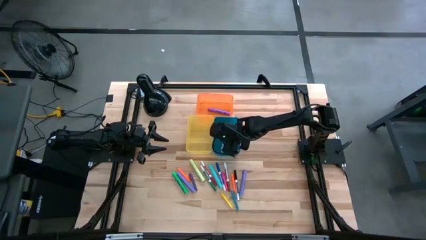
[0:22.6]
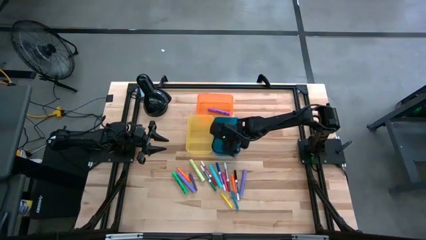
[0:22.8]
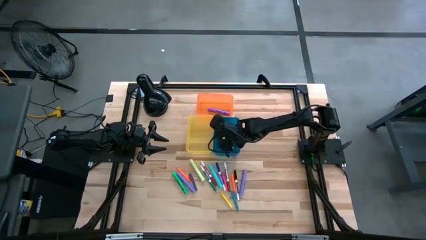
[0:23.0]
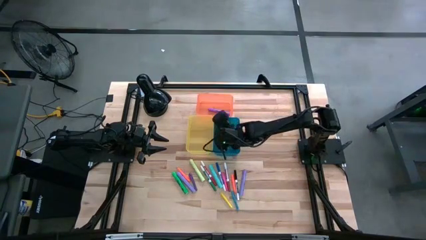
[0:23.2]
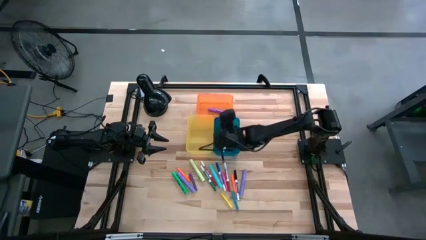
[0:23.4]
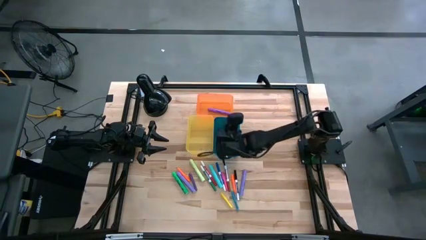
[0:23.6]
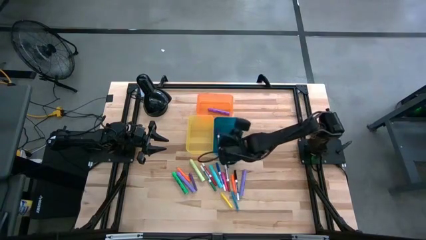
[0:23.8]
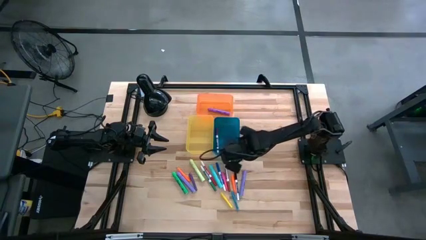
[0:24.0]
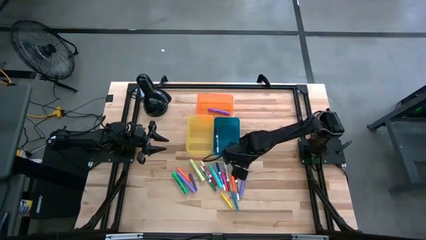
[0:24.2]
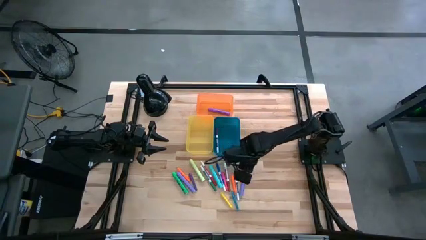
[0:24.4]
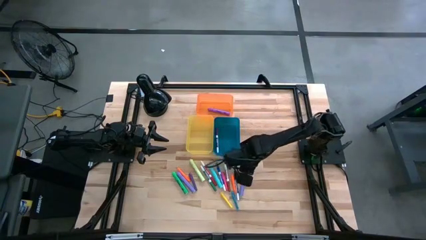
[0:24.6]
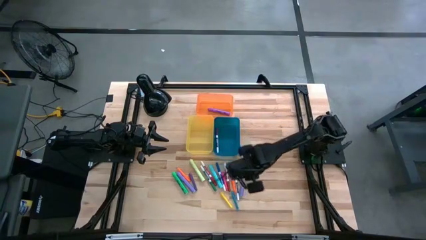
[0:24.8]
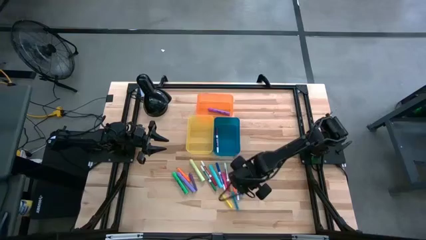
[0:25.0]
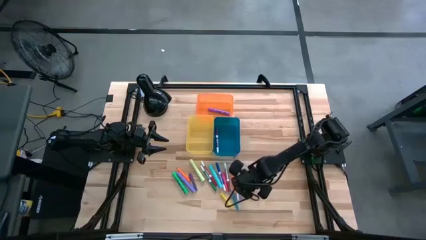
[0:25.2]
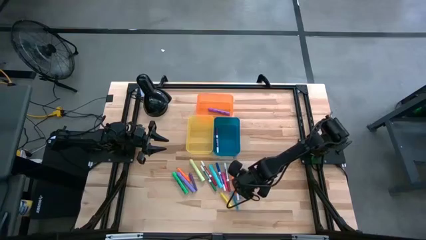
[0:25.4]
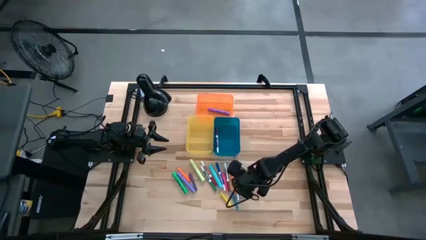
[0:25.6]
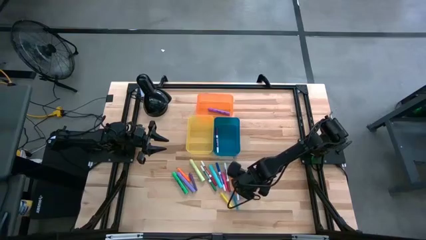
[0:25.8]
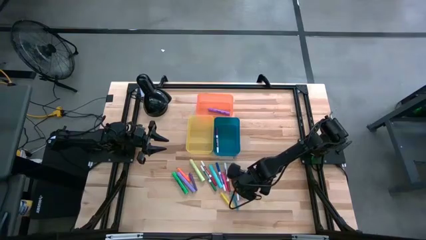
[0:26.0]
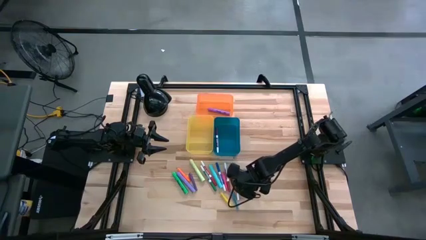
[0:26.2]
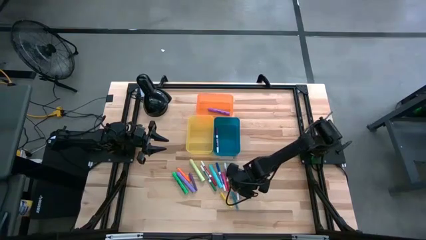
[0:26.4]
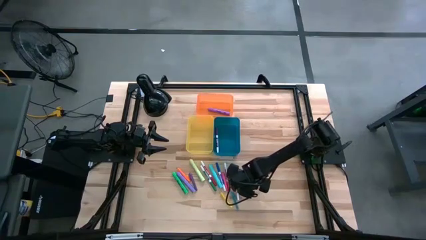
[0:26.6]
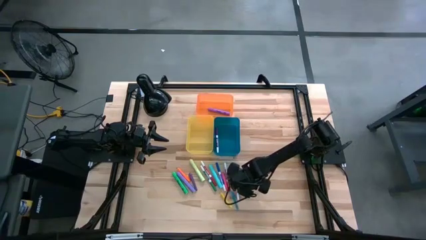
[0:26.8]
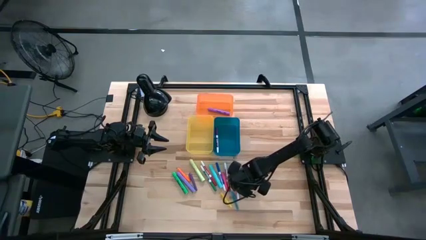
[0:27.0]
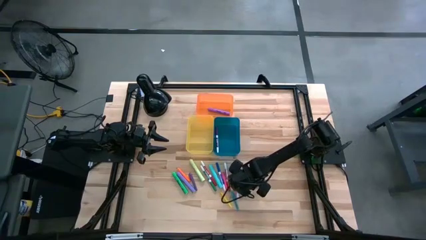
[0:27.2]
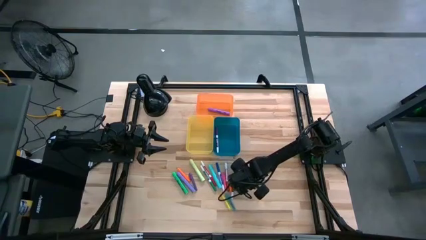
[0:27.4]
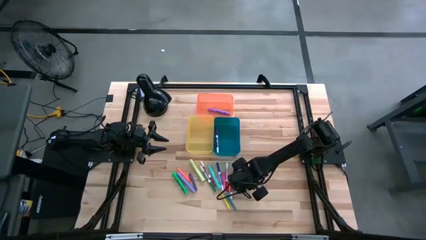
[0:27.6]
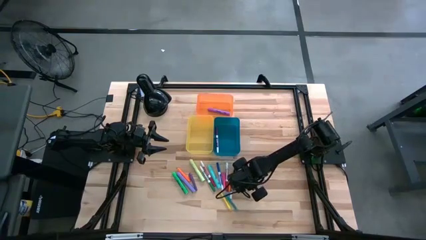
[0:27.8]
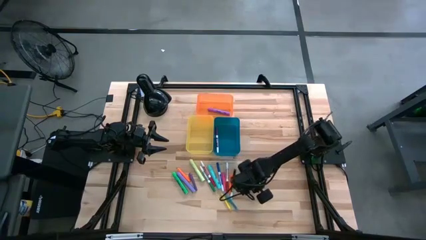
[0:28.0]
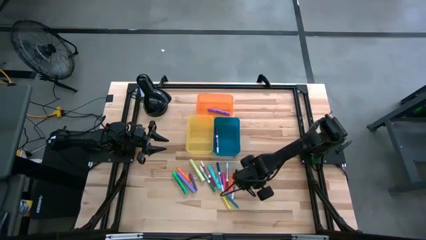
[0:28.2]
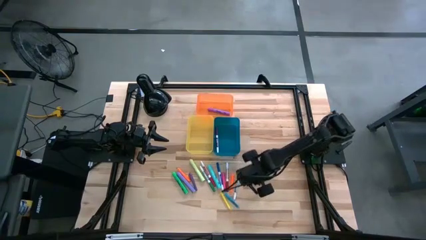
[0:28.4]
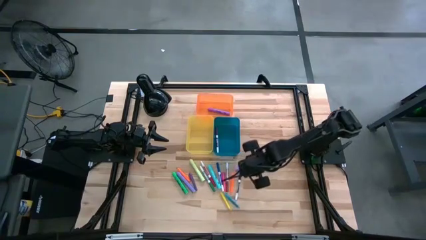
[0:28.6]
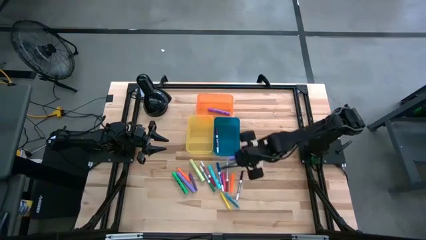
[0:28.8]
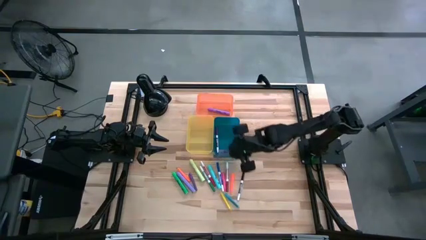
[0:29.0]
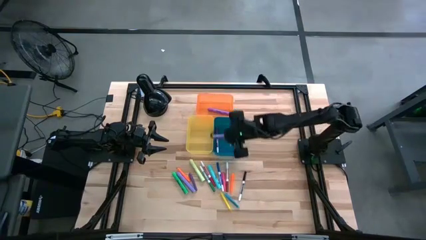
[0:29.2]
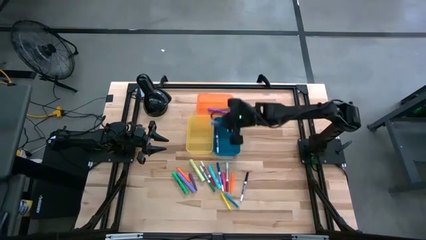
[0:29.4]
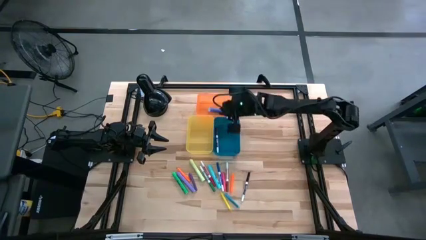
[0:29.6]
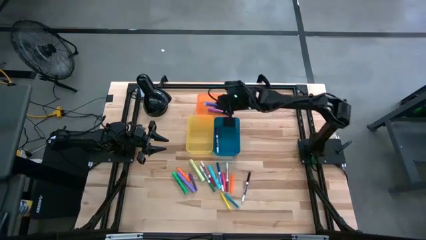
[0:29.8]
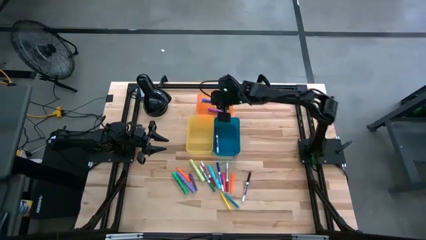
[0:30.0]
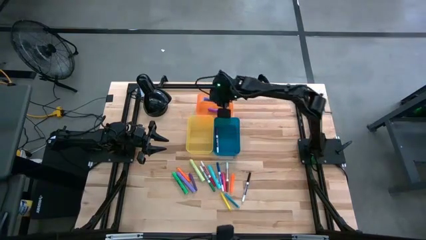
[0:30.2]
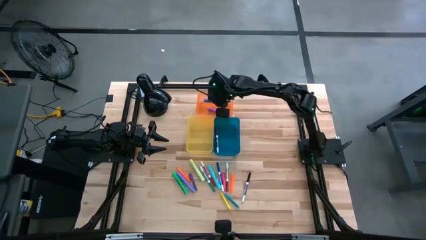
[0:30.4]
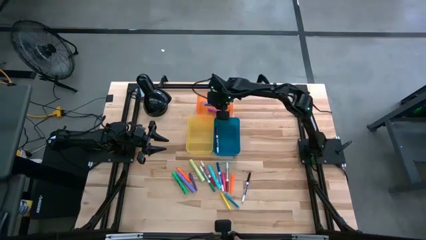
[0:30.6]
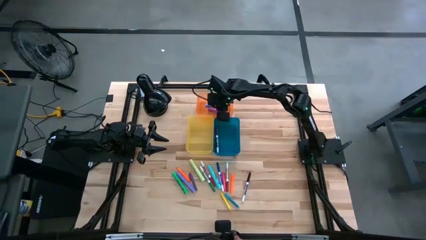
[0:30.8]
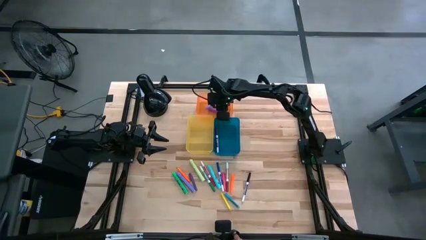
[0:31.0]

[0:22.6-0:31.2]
Task: Pick & Place Markers
Put the right purple highlighter pen into the orange bin

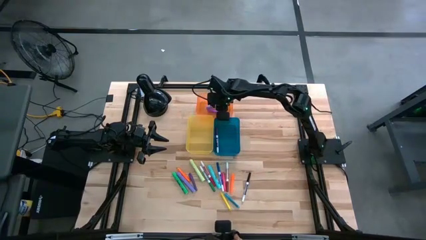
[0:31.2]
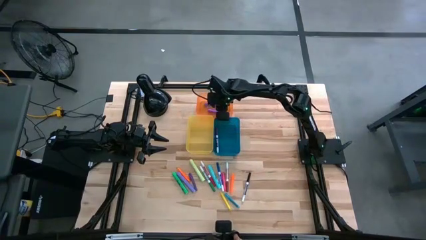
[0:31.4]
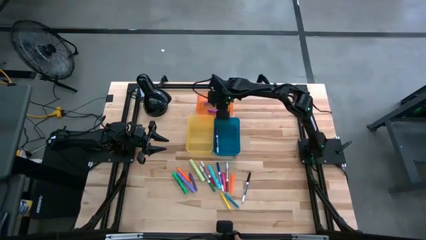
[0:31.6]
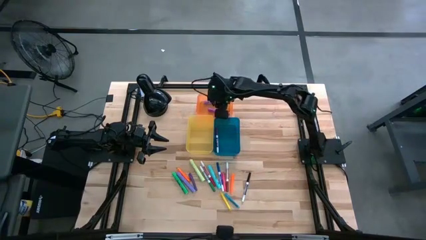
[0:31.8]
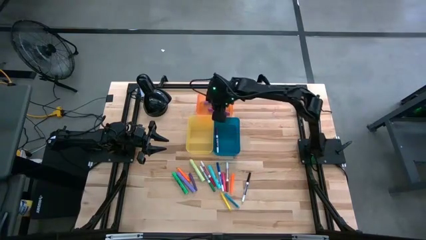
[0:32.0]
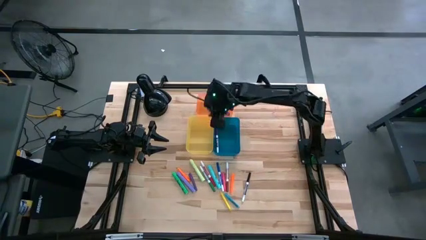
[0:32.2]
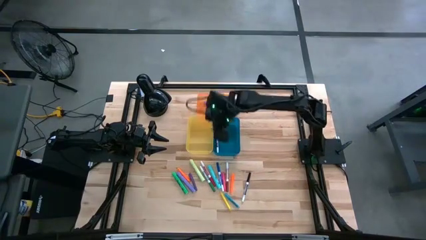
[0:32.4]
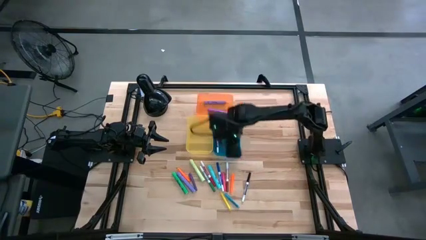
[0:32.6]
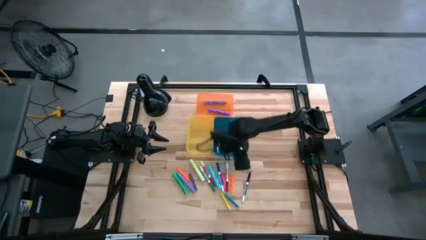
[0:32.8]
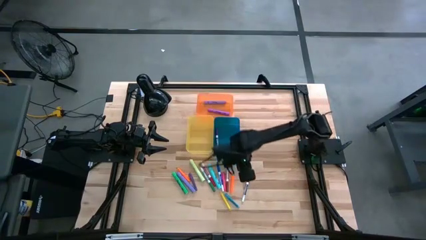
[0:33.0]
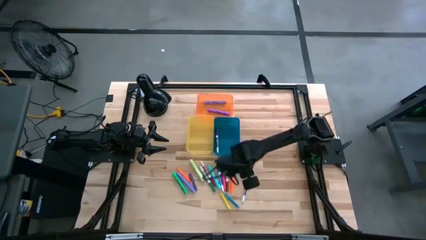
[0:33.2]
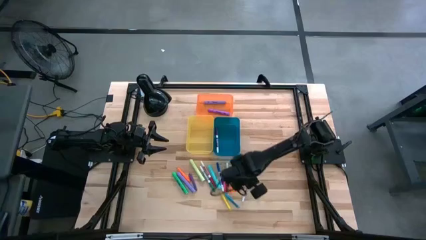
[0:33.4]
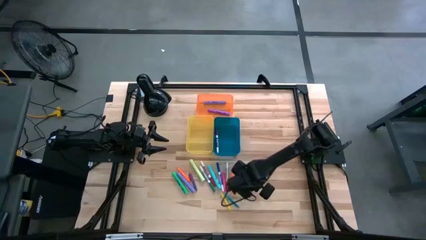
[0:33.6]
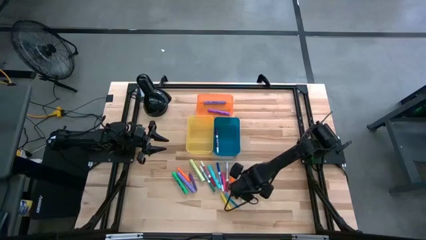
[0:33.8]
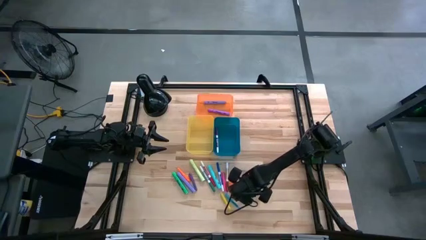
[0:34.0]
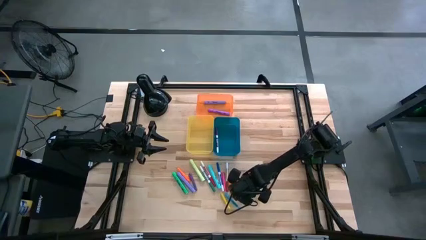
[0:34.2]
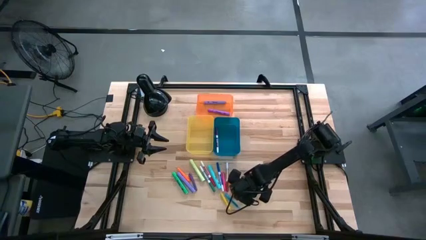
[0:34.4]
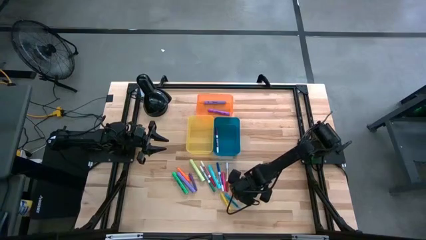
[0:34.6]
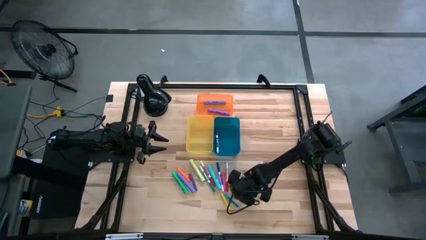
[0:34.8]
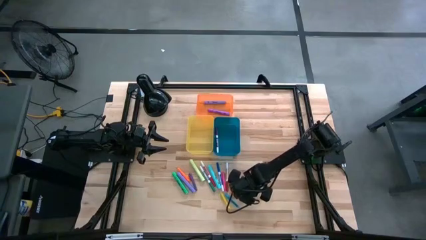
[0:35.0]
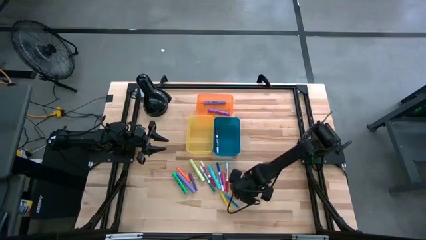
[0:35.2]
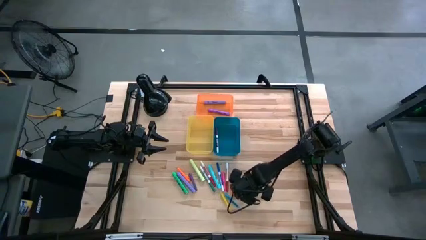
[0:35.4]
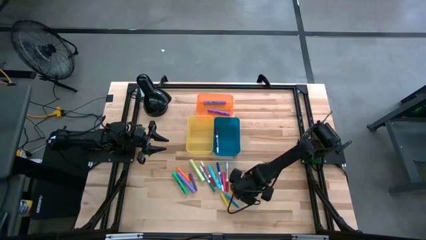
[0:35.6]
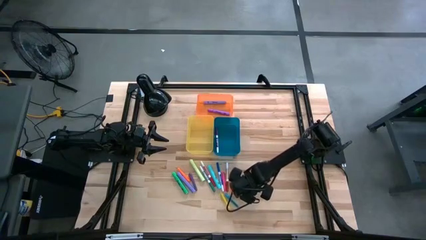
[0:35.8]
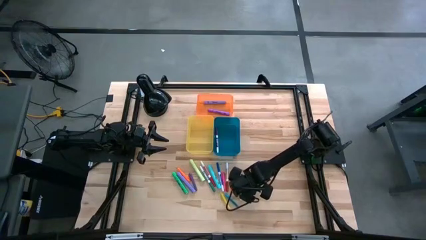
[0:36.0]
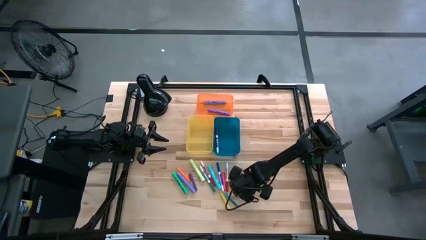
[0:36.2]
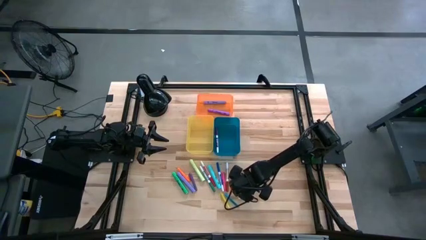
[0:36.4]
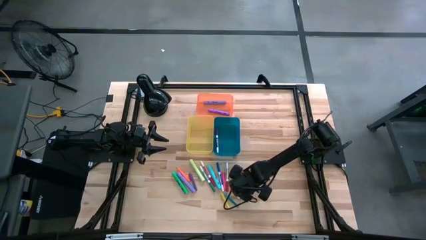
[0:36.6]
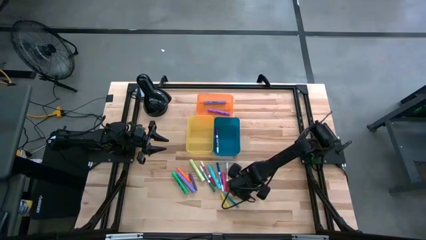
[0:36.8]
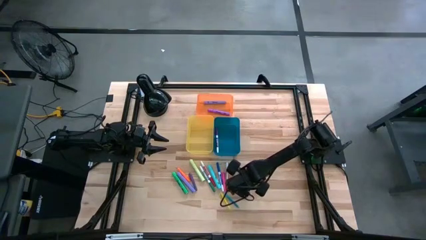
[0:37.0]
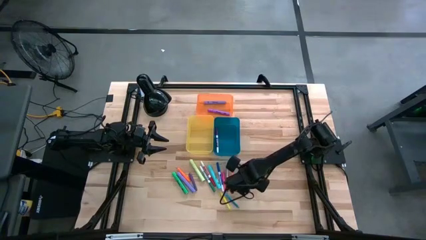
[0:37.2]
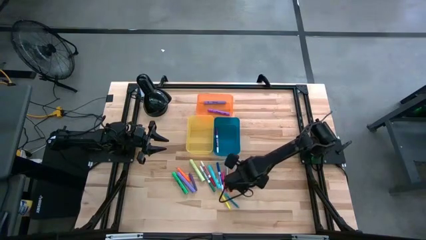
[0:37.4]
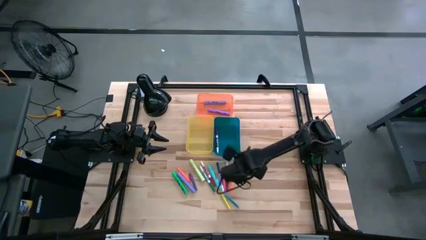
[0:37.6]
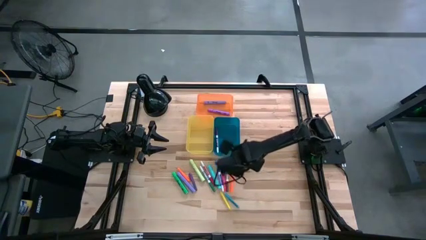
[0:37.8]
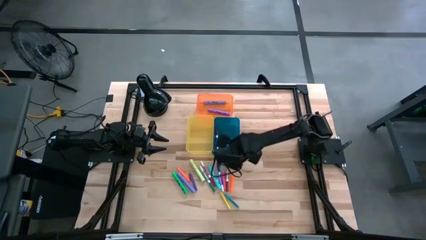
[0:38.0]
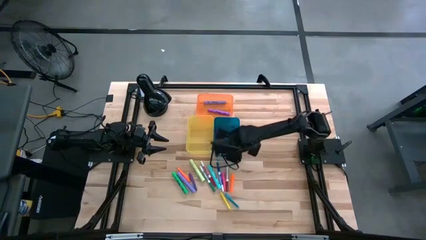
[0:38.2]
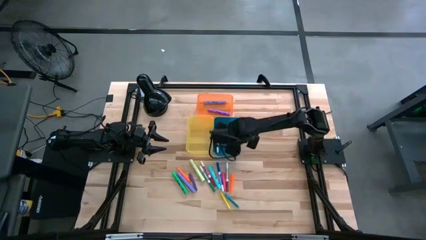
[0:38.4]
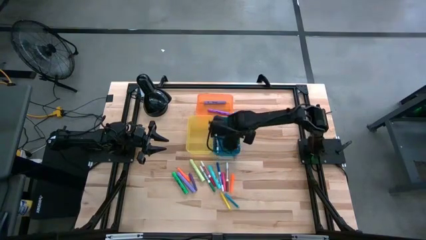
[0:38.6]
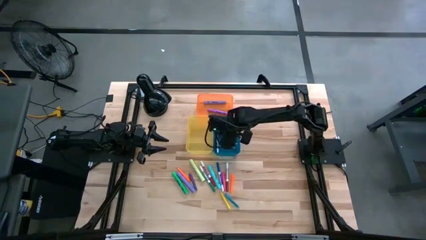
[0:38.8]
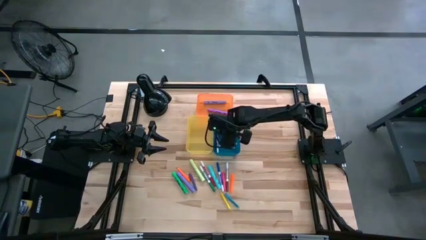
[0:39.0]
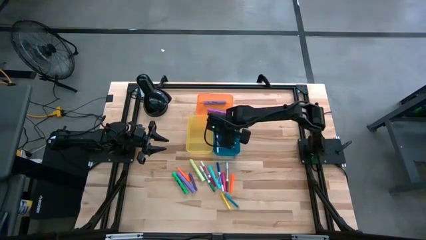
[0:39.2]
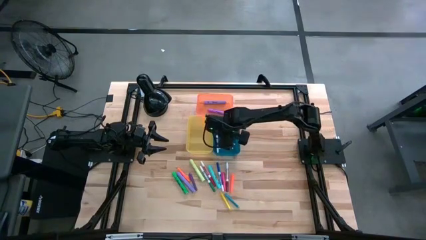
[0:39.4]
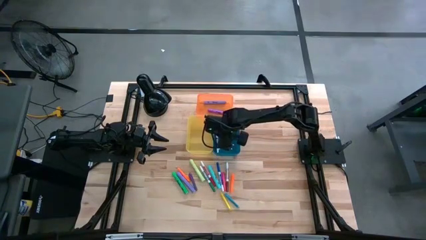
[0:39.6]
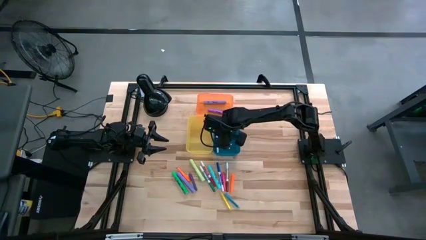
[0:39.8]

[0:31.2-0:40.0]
Put the black marker pen into the blue bin
